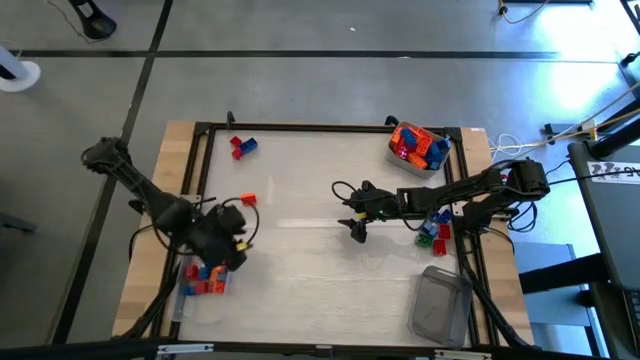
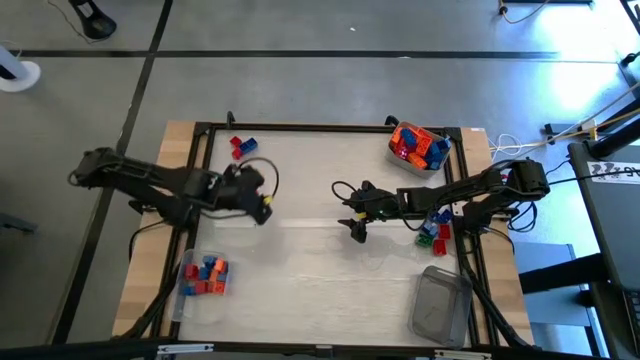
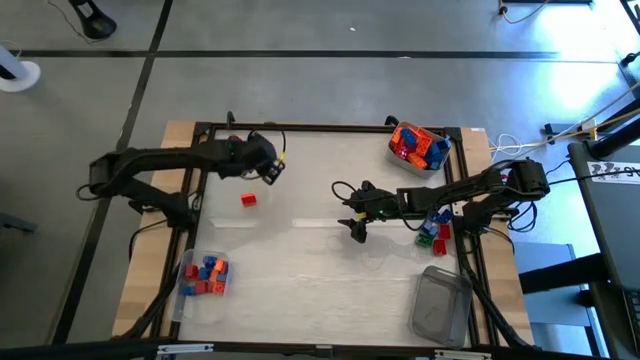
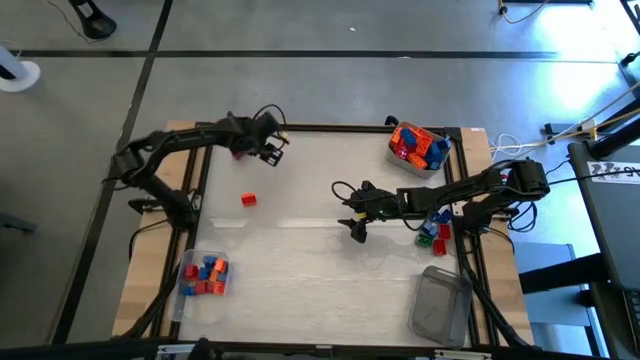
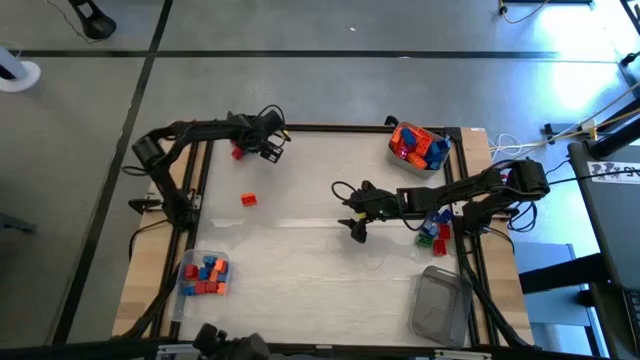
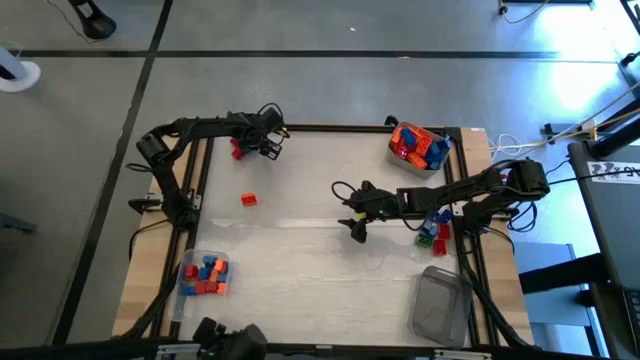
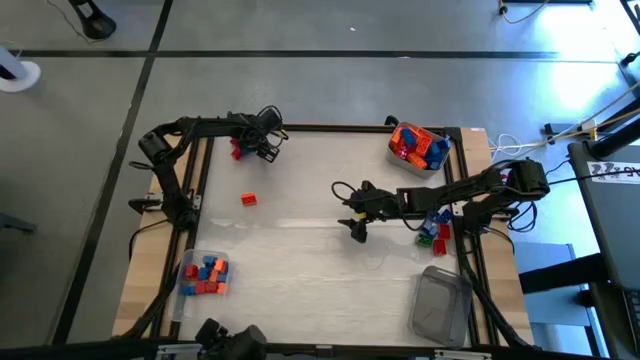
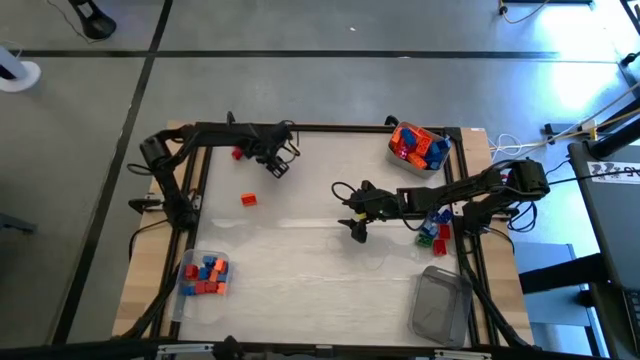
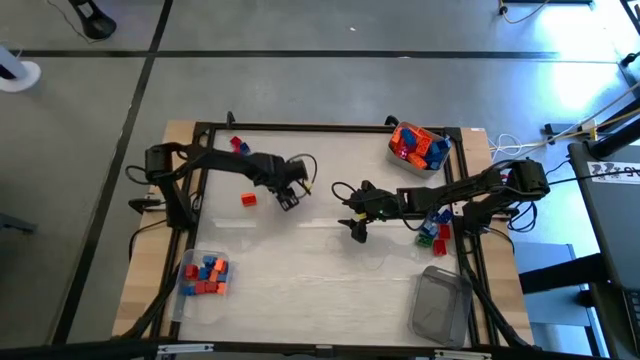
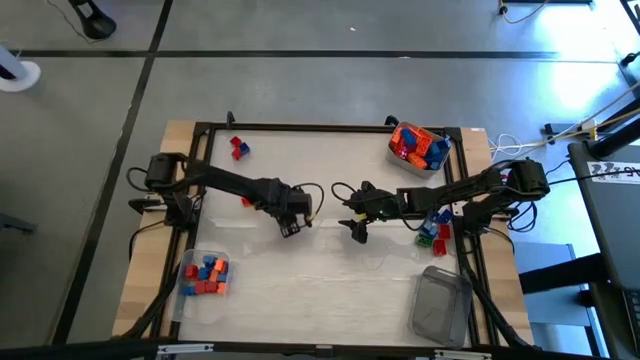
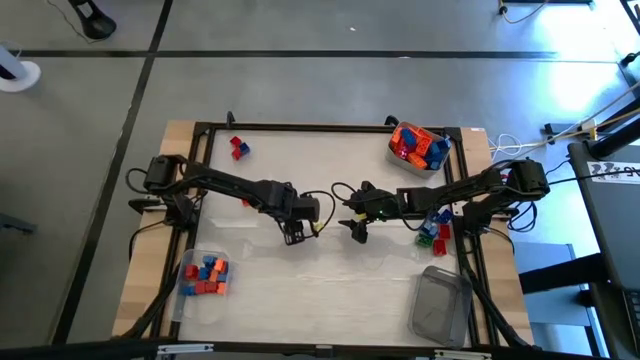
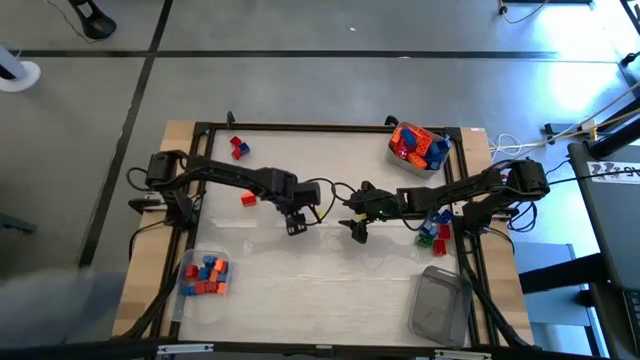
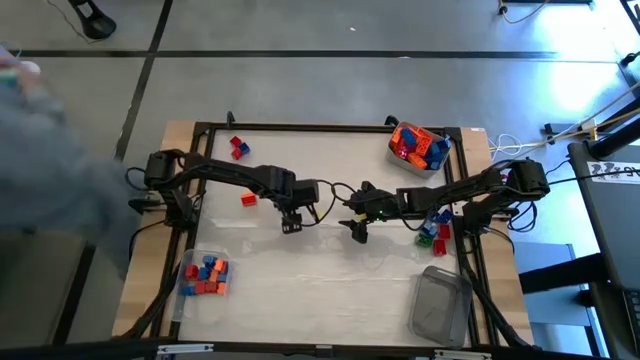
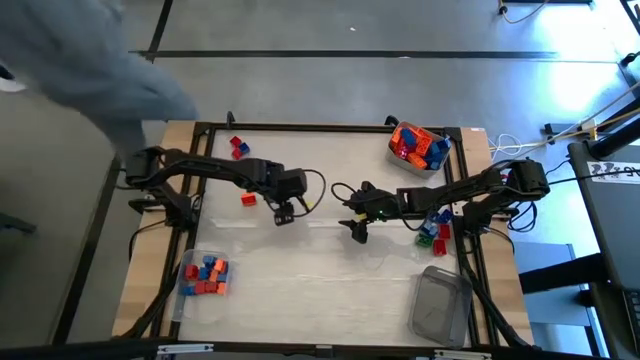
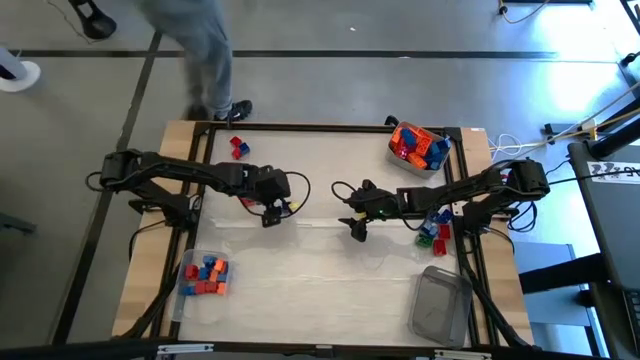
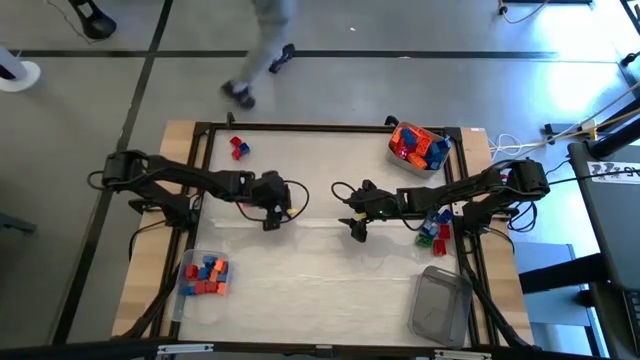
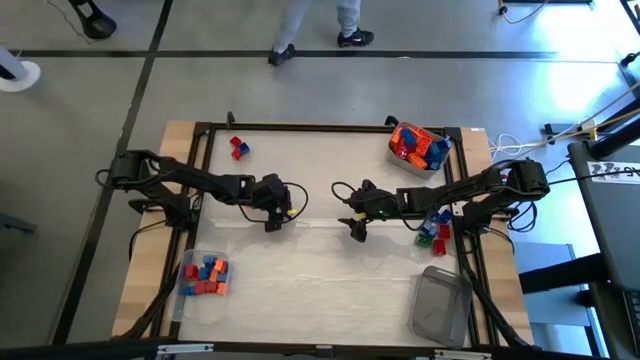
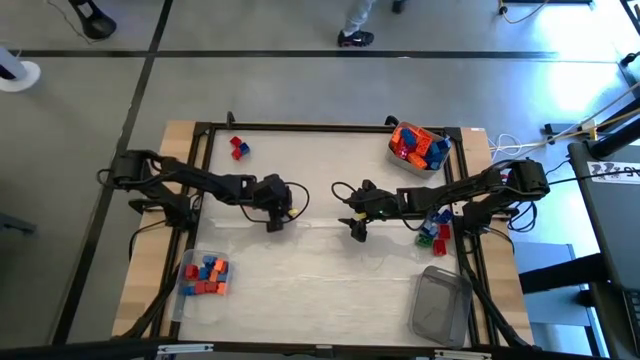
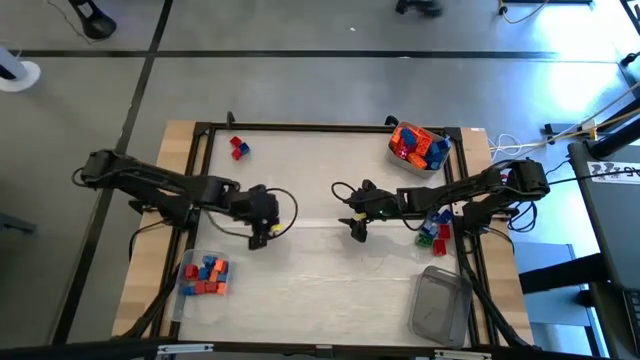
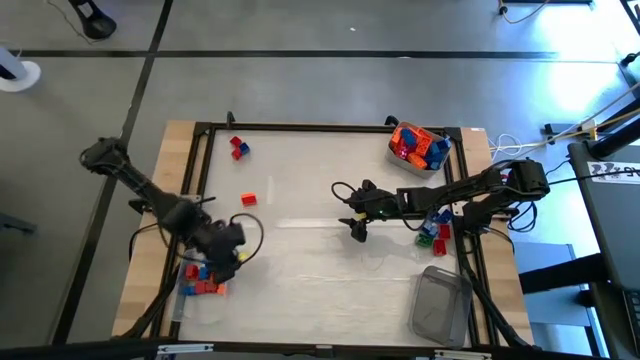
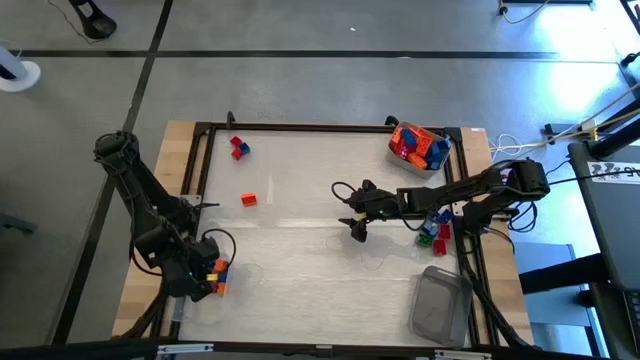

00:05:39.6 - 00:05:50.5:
Task: Sort blocks by size
Put the blue game piece into the transparent bin

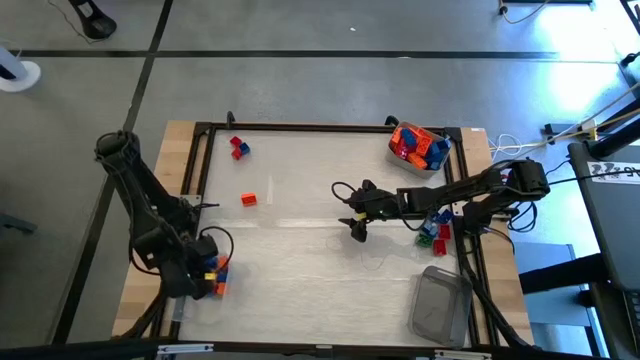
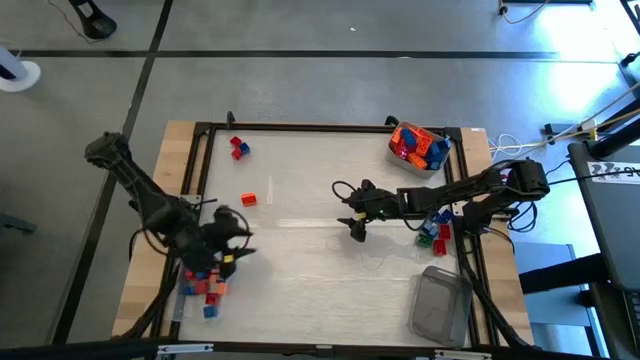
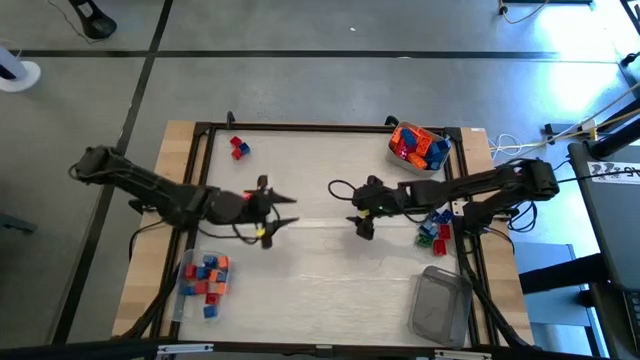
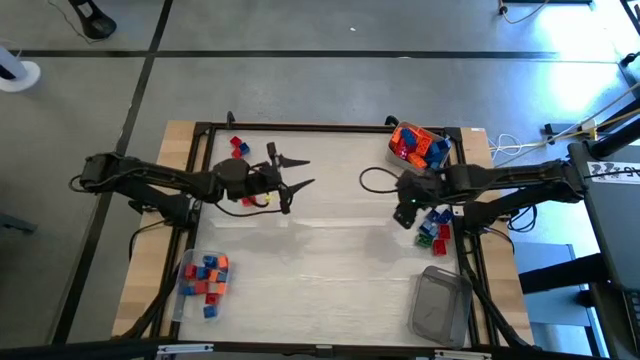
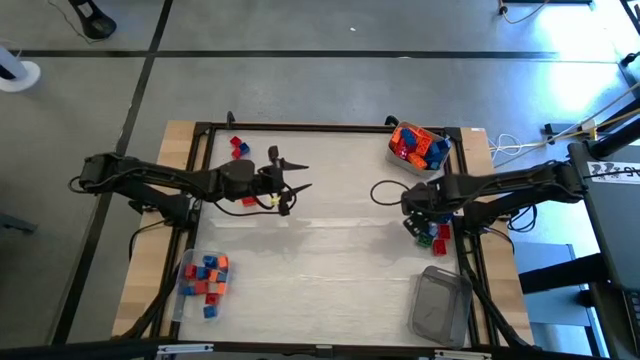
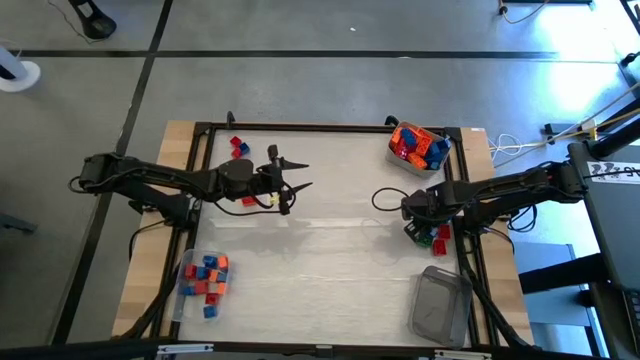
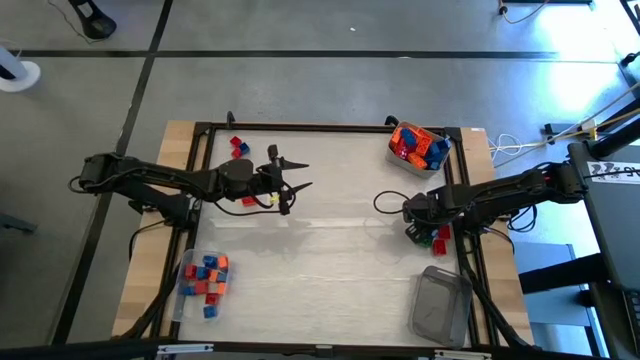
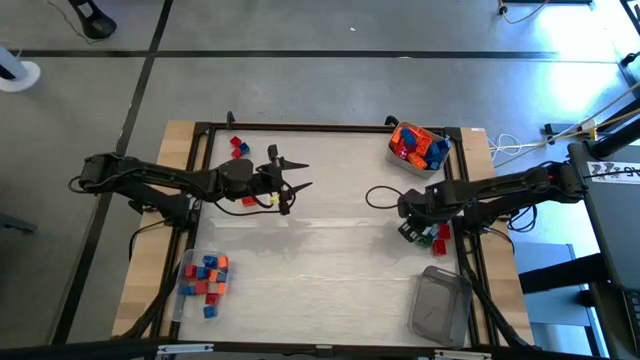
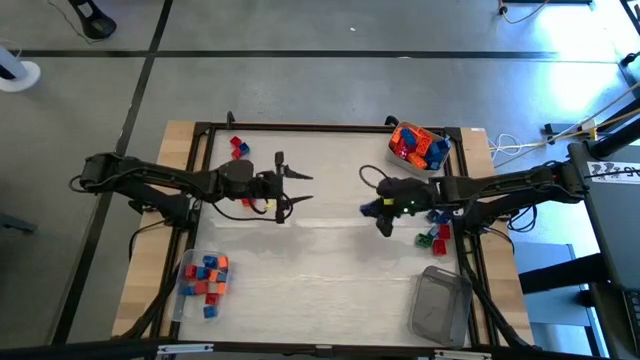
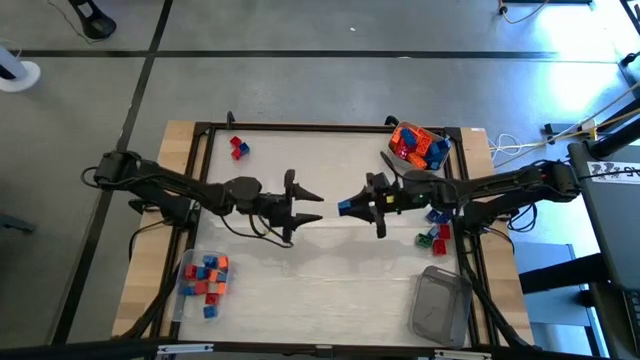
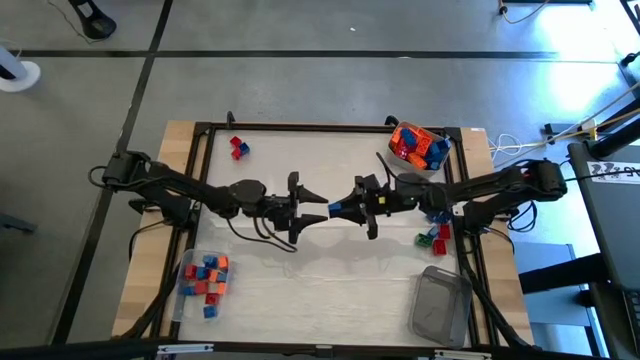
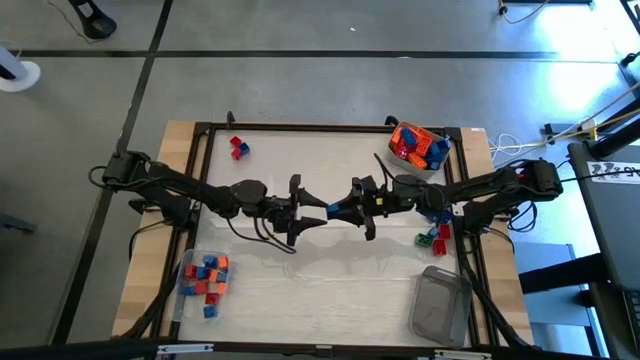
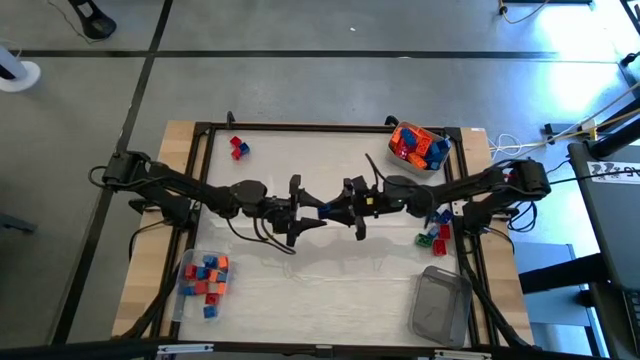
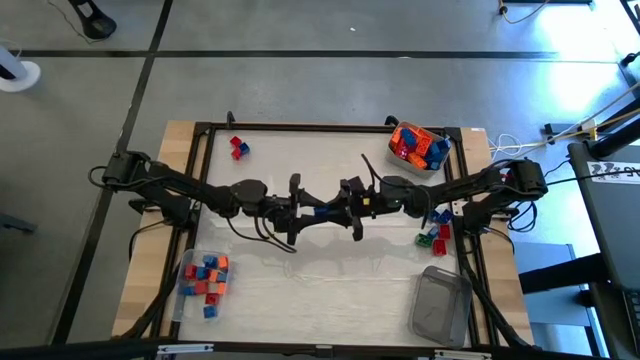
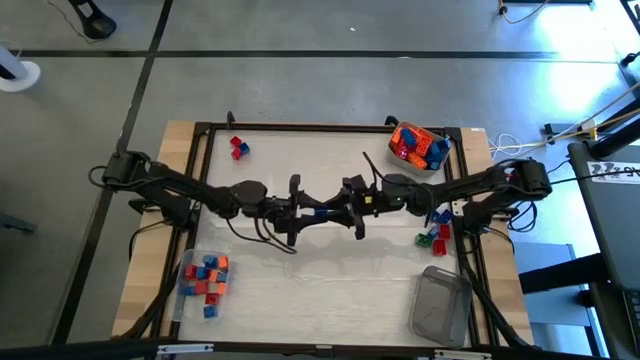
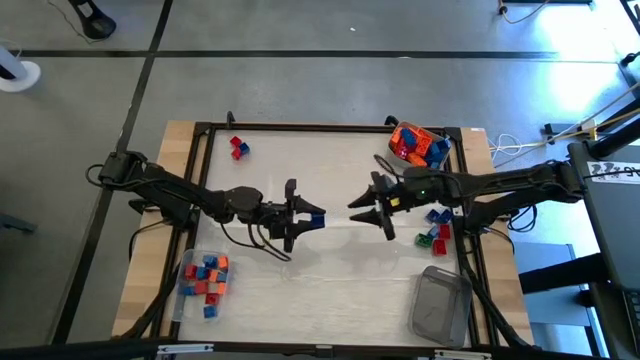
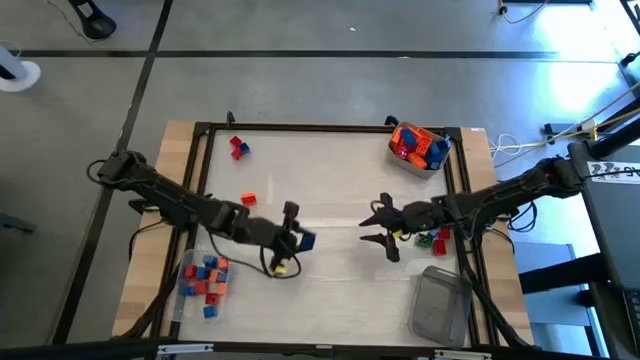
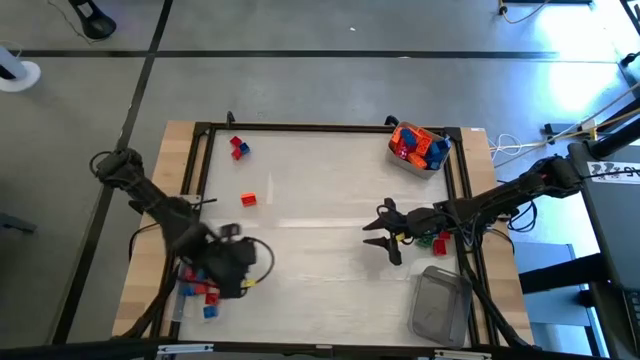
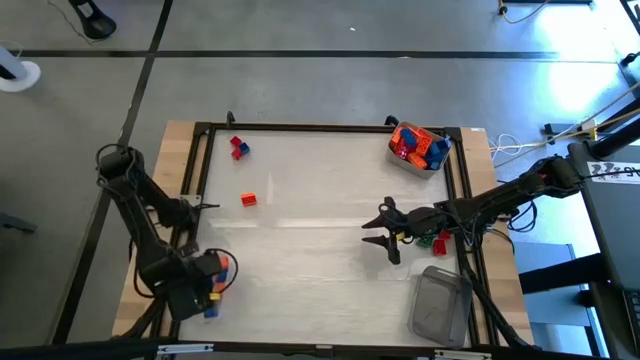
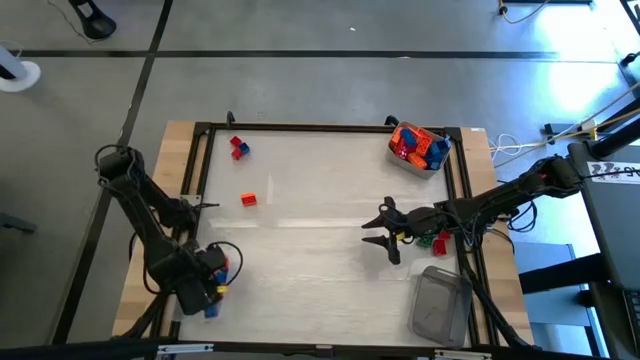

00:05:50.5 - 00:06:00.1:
Put the blue game piece into the transparent bin
